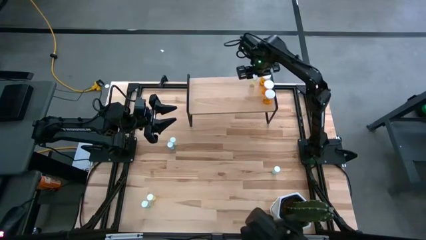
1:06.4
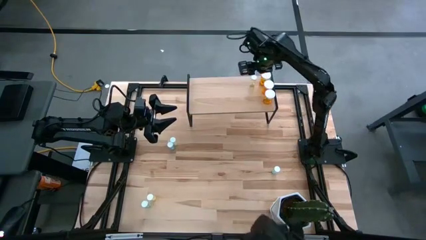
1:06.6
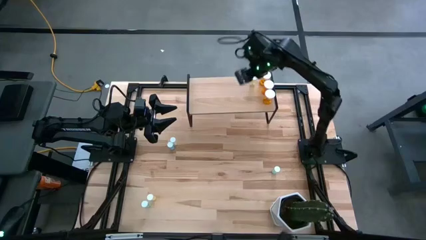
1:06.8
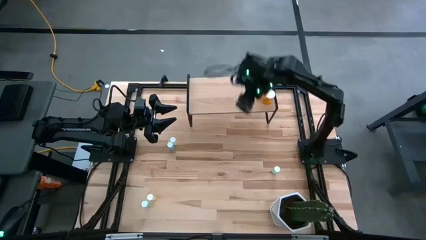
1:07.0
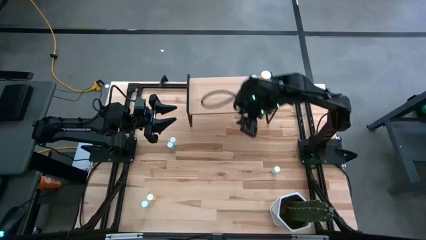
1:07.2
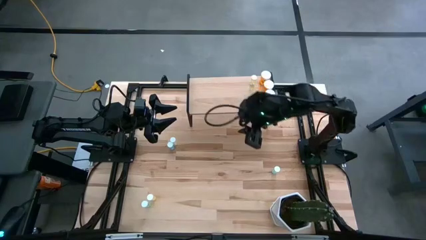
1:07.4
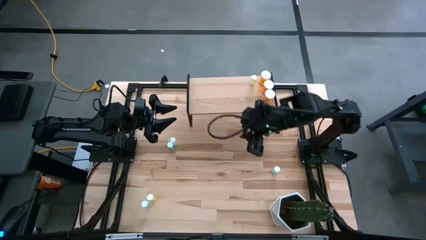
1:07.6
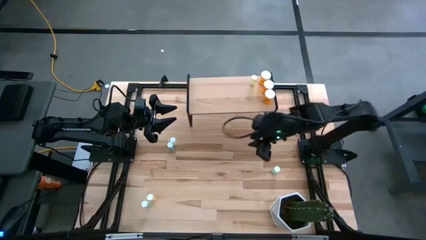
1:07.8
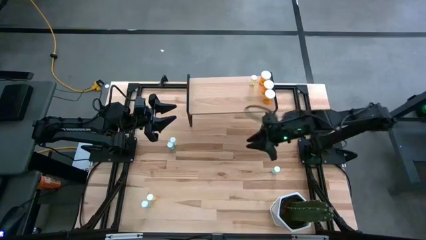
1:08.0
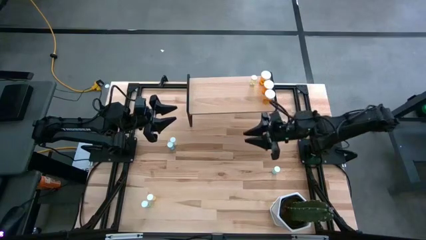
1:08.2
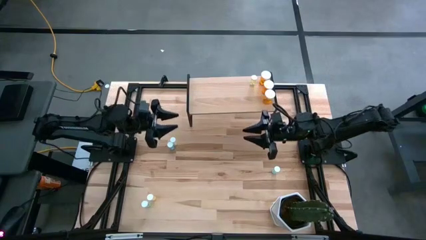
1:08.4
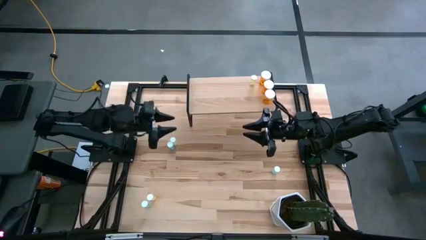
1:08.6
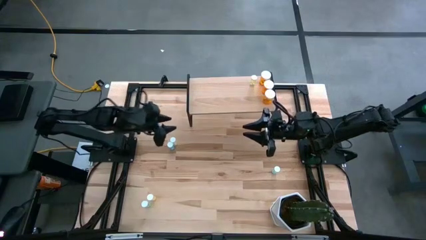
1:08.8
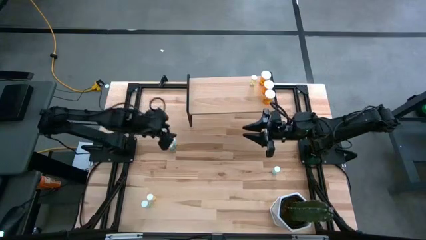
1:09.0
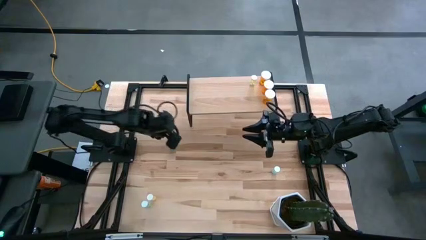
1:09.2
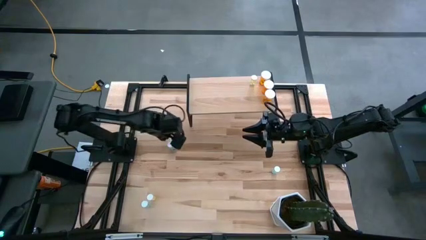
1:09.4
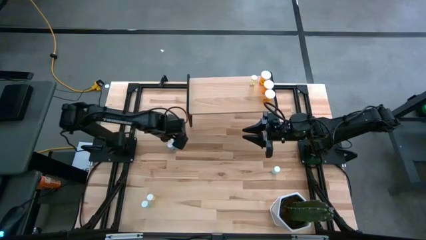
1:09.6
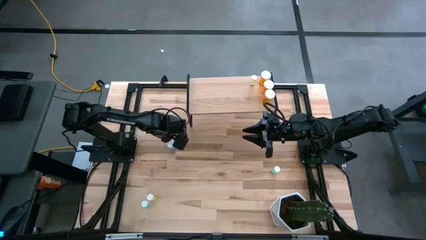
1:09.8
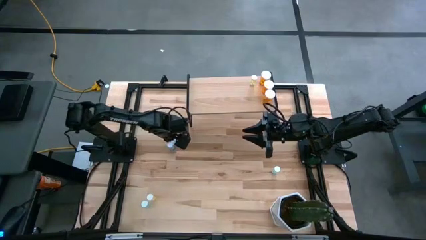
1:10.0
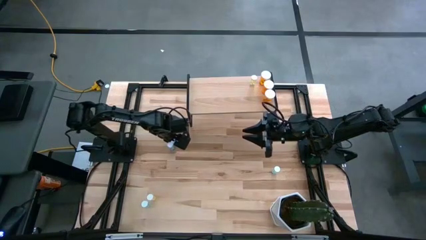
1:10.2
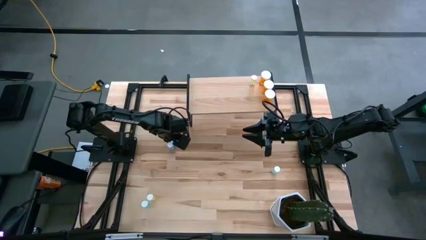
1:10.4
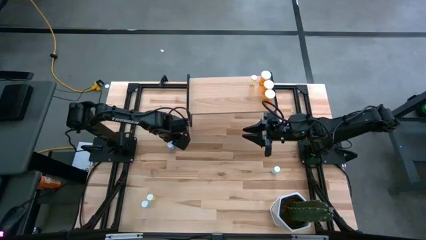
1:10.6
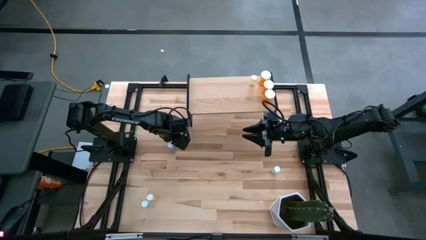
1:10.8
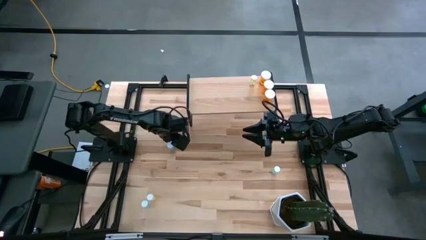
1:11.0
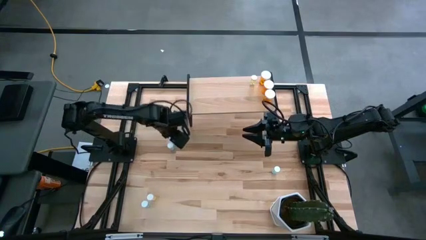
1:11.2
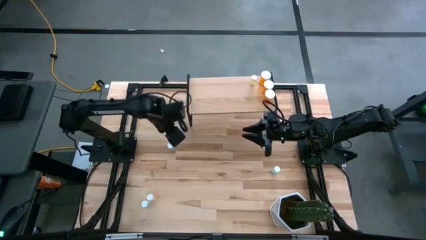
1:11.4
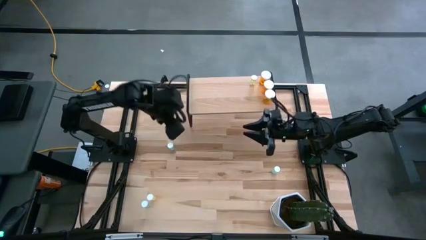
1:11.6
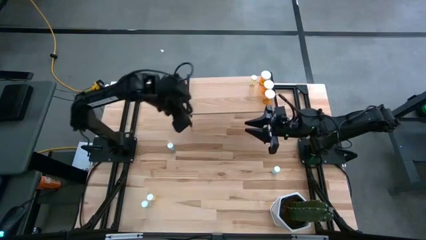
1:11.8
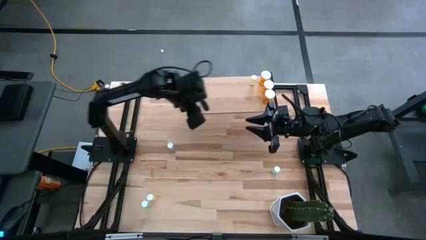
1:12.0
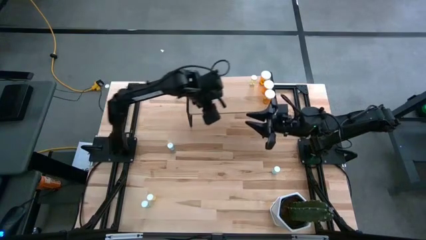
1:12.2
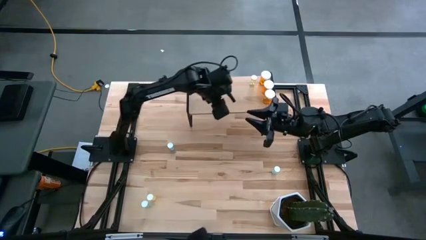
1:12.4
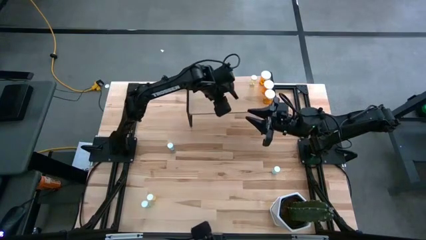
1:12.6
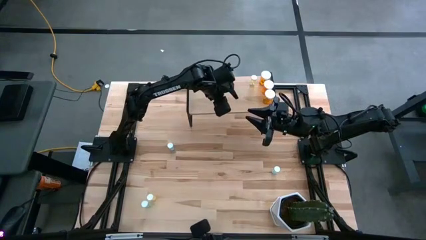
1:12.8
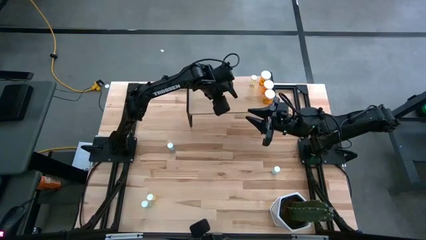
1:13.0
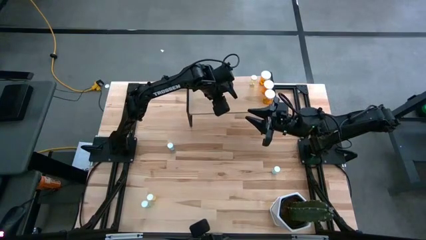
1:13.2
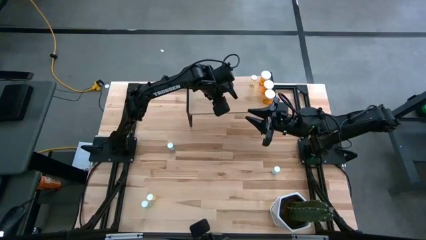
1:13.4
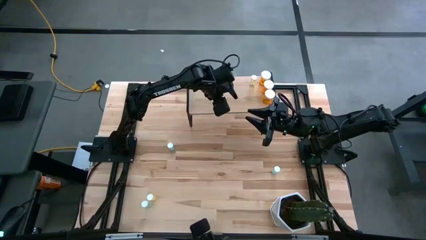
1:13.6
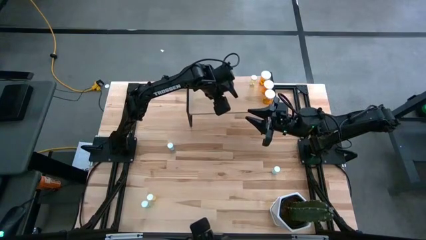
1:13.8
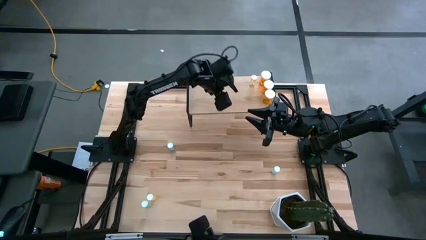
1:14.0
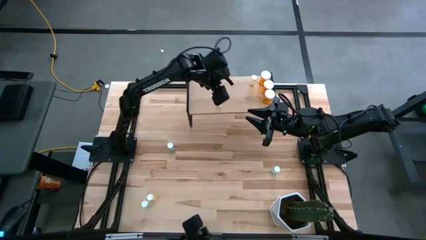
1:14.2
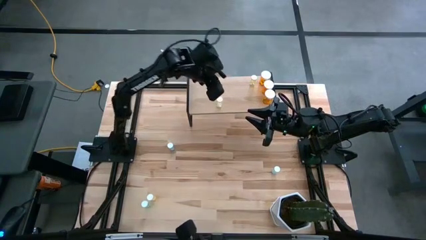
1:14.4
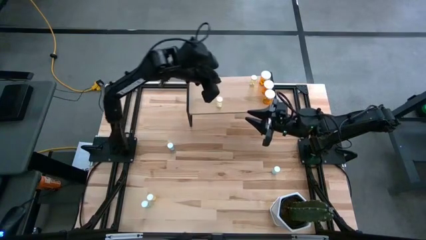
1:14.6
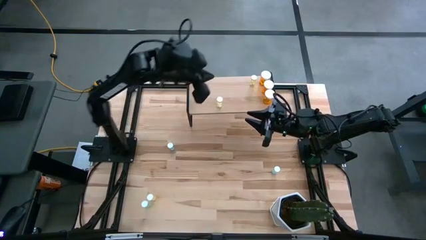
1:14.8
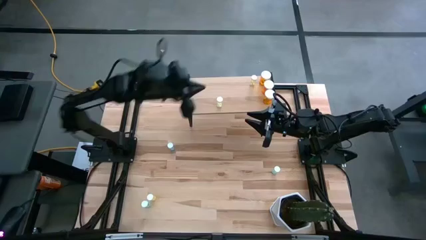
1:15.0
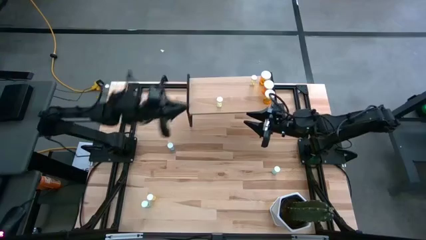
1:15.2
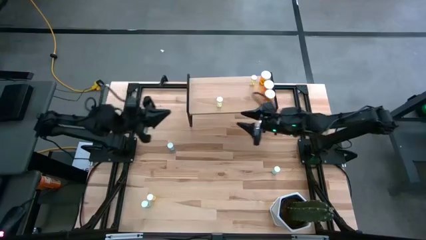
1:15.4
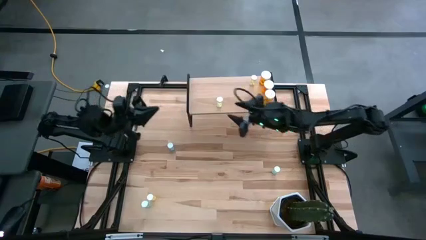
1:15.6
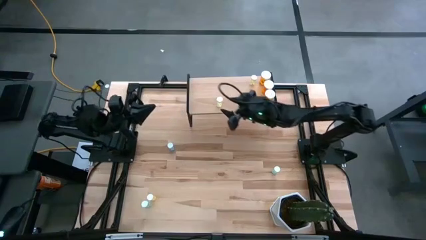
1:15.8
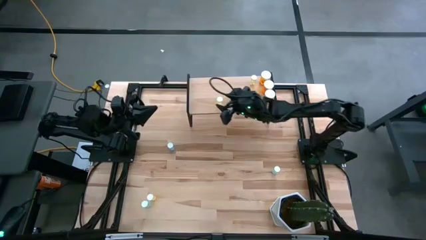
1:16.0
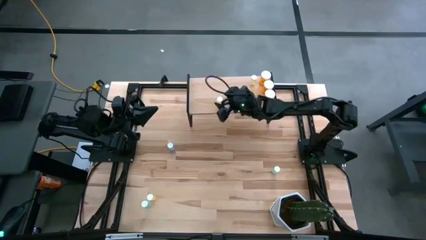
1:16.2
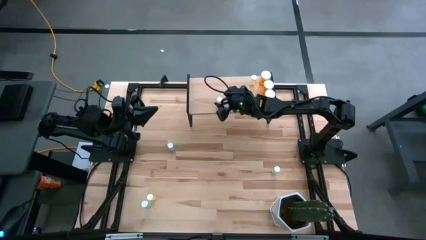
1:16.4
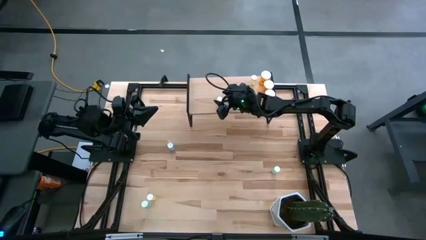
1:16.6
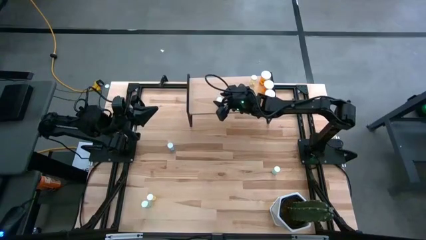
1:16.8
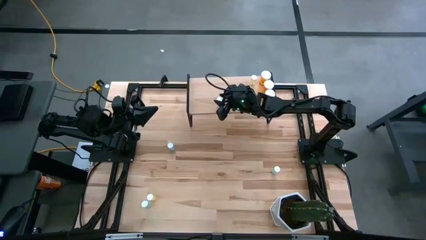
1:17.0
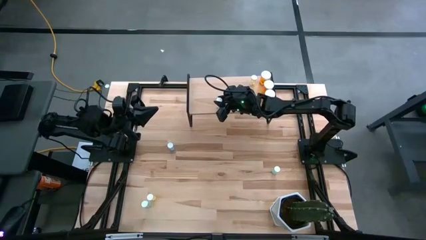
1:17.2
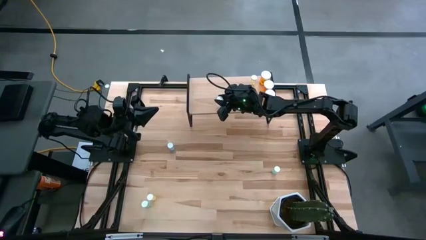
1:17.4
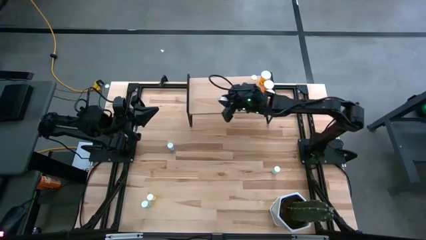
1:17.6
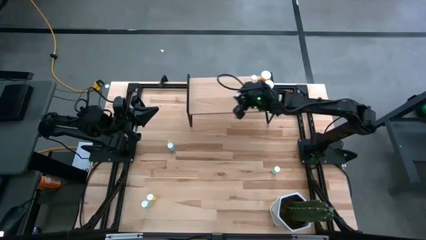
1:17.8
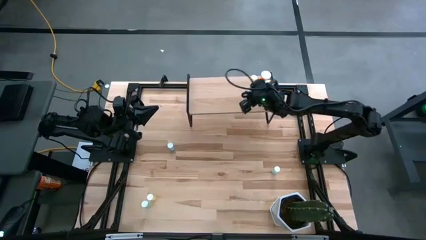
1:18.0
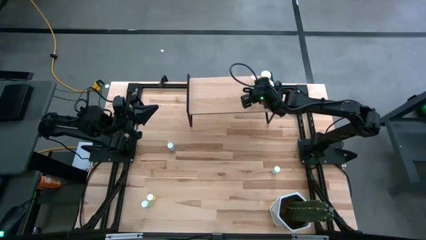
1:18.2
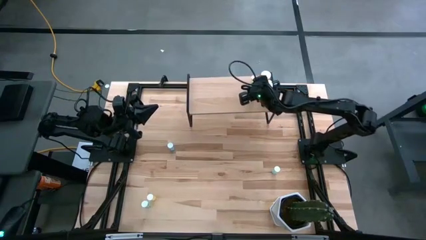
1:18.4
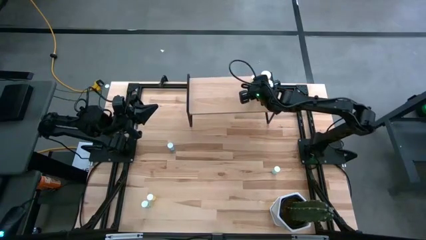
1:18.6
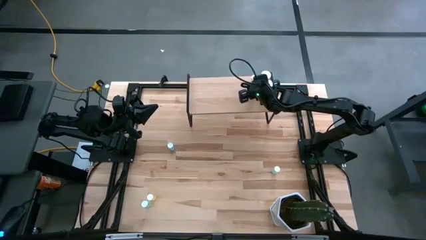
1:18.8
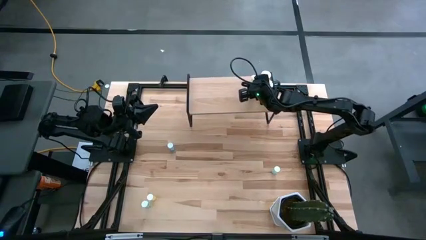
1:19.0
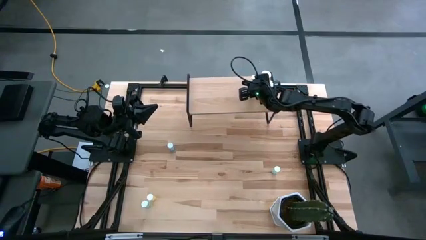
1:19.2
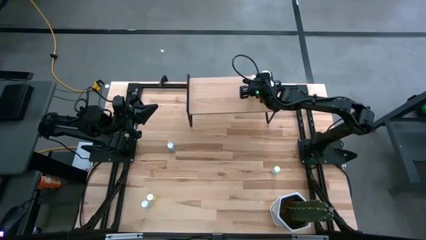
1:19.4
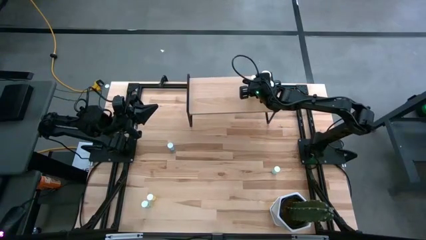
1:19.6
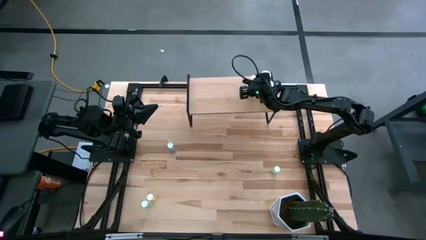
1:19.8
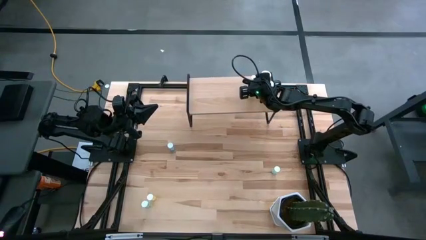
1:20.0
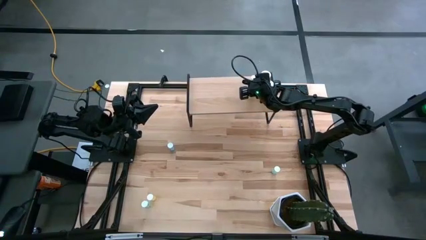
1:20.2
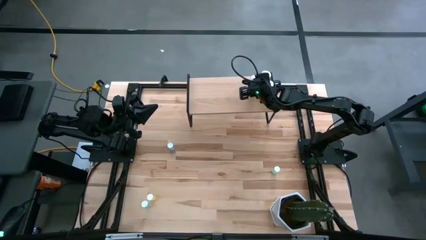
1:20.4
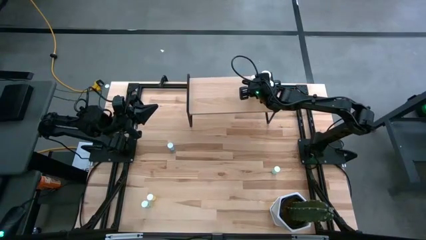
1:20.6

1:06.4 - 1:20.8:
Task: Pick and place medicine bottles onto shelf by color
Put the top yellow pill bottle on the shelf aligned with the yellow pill bottle
